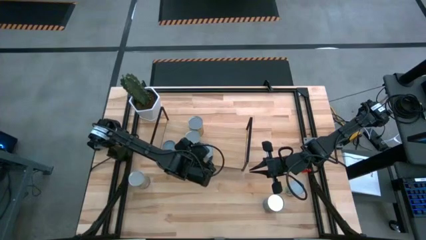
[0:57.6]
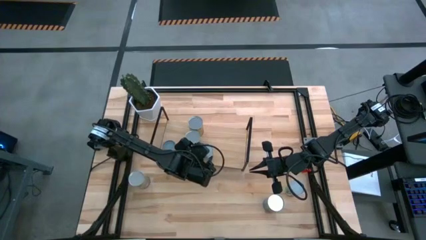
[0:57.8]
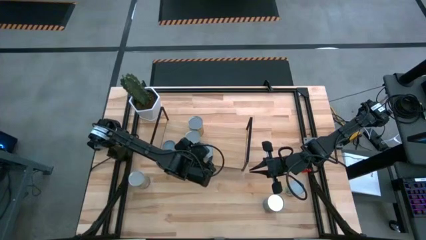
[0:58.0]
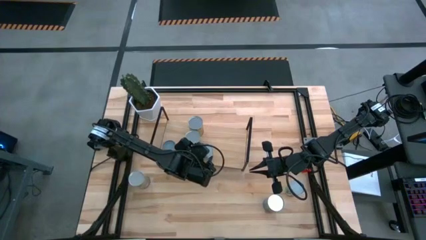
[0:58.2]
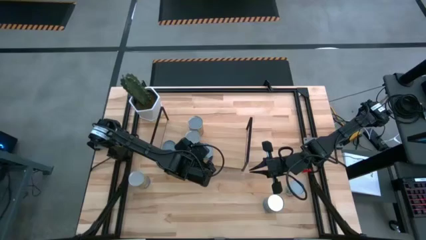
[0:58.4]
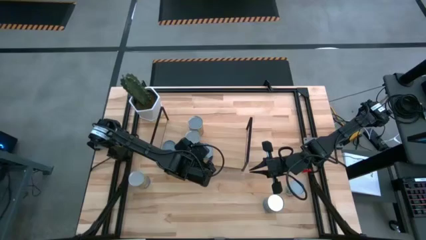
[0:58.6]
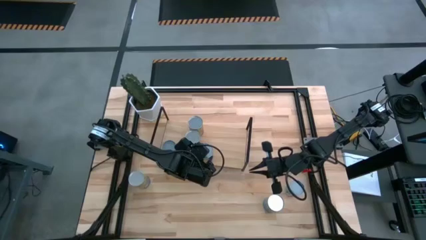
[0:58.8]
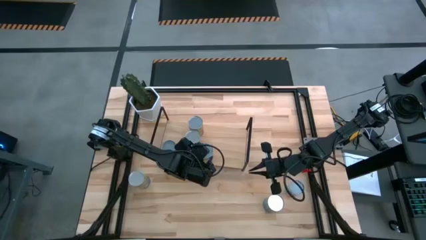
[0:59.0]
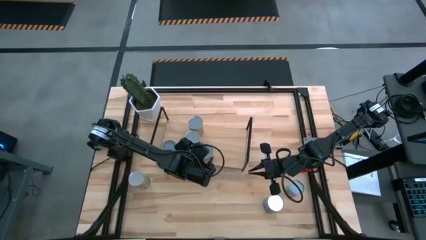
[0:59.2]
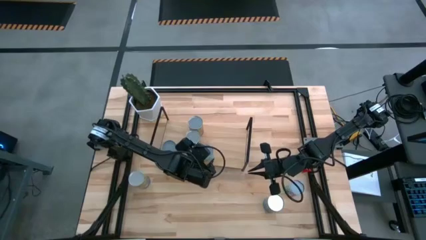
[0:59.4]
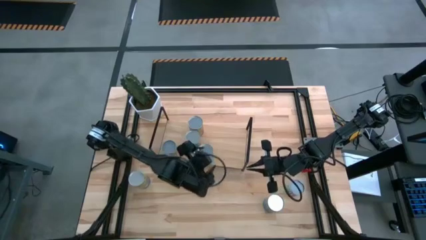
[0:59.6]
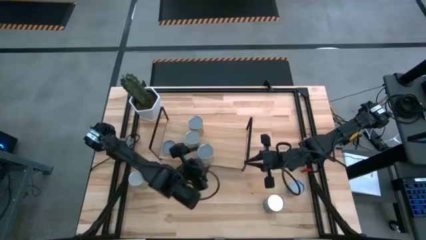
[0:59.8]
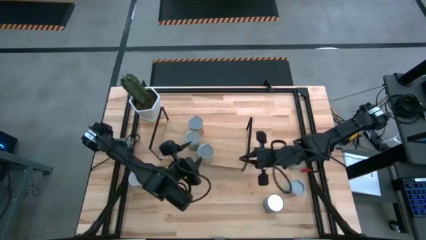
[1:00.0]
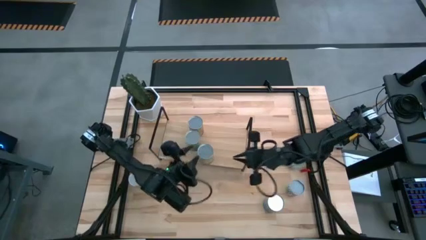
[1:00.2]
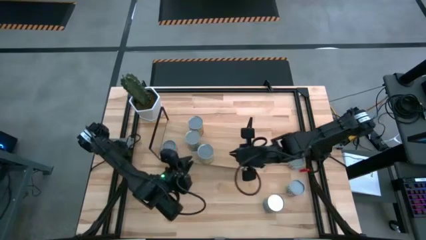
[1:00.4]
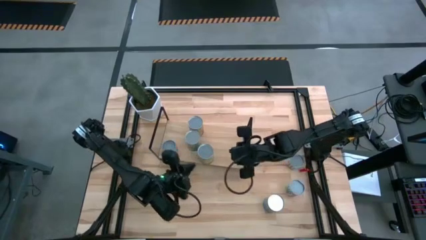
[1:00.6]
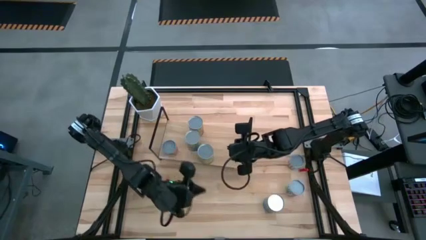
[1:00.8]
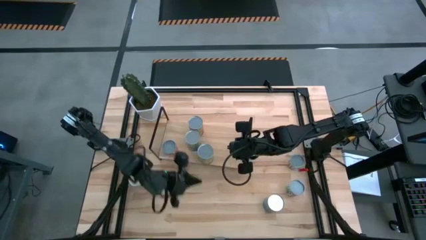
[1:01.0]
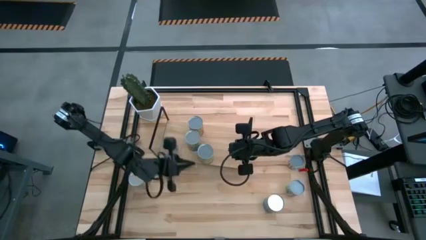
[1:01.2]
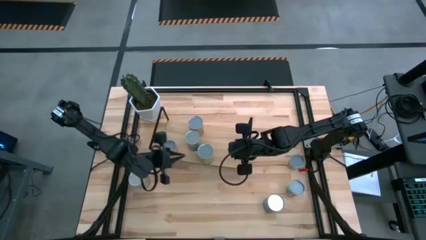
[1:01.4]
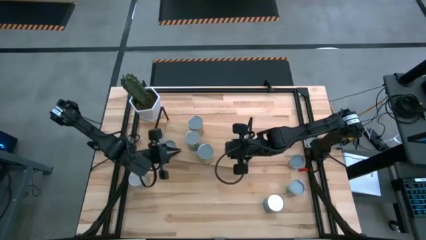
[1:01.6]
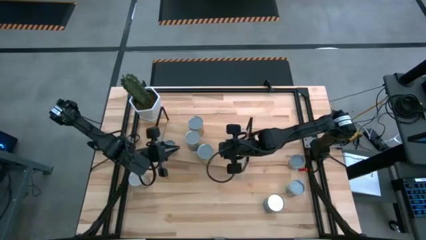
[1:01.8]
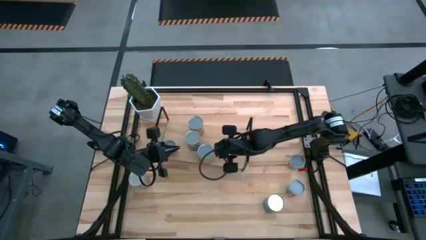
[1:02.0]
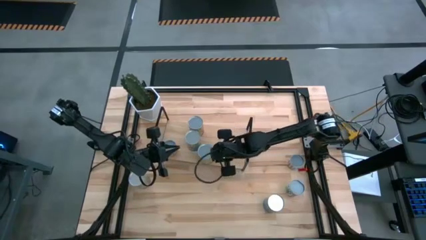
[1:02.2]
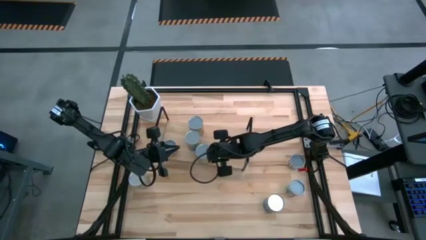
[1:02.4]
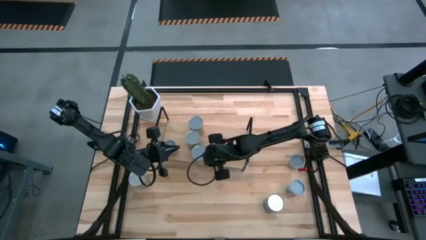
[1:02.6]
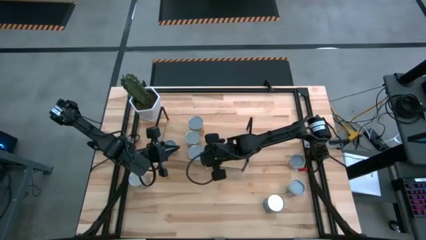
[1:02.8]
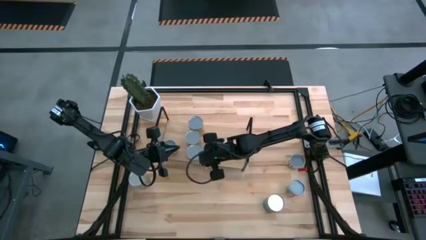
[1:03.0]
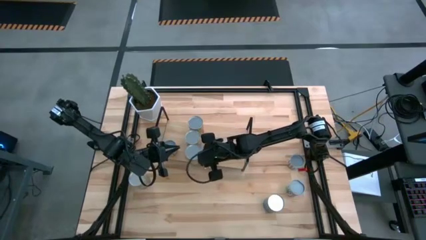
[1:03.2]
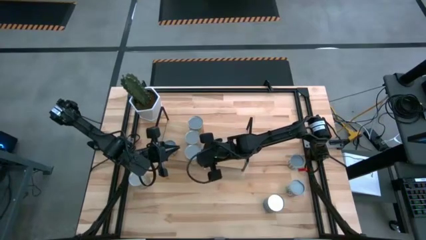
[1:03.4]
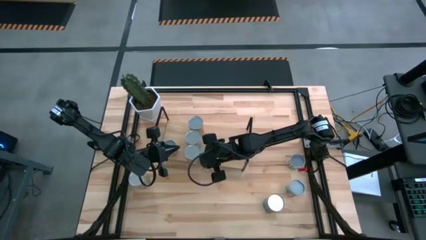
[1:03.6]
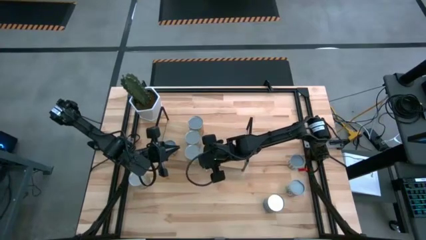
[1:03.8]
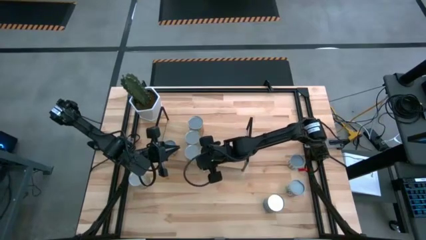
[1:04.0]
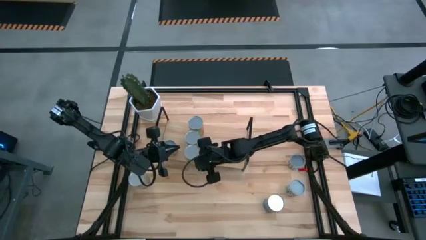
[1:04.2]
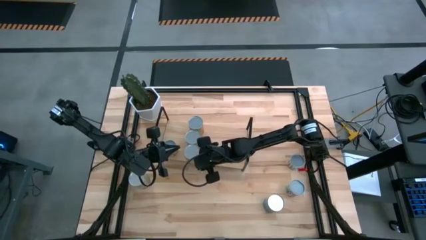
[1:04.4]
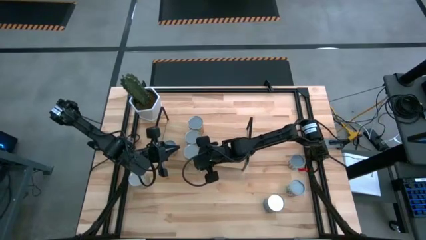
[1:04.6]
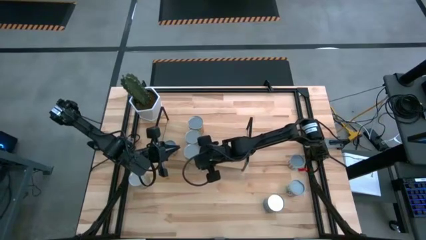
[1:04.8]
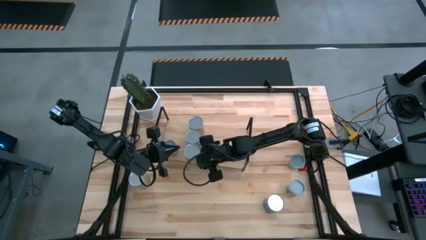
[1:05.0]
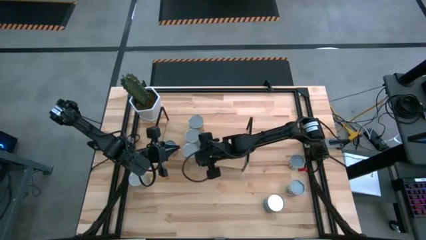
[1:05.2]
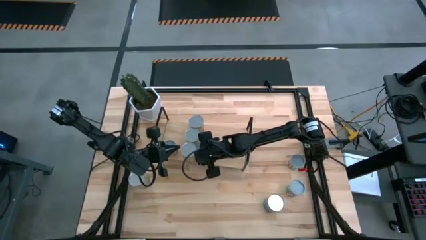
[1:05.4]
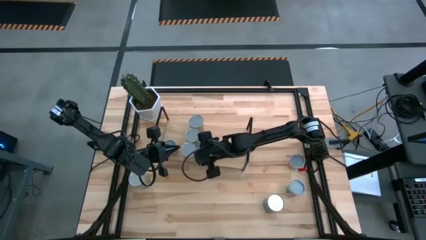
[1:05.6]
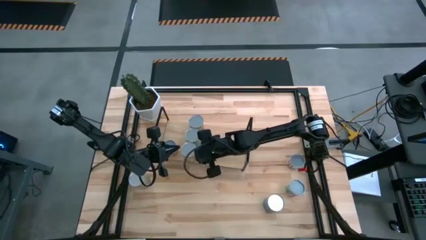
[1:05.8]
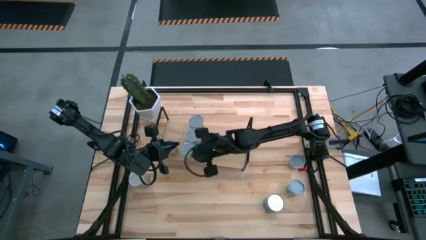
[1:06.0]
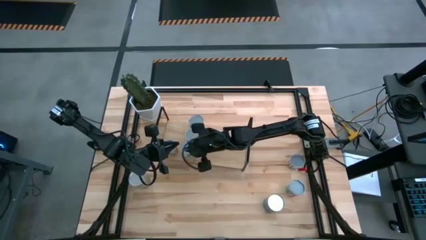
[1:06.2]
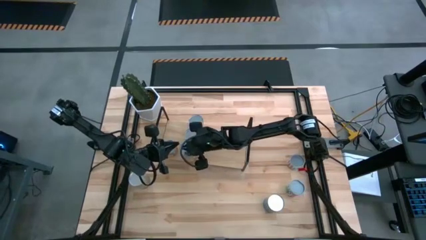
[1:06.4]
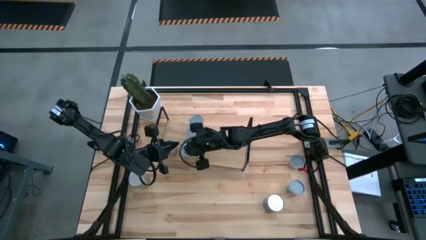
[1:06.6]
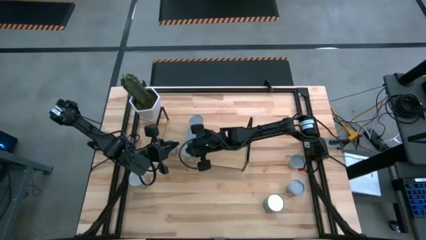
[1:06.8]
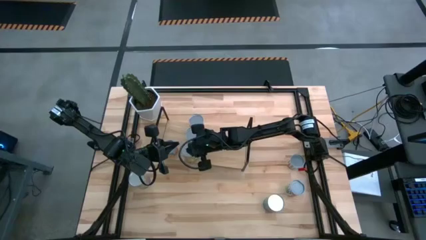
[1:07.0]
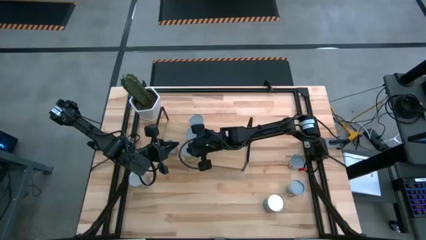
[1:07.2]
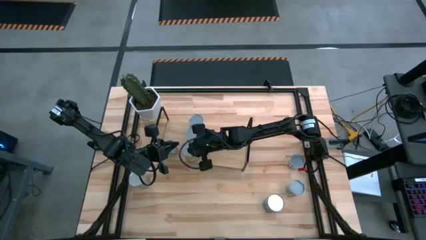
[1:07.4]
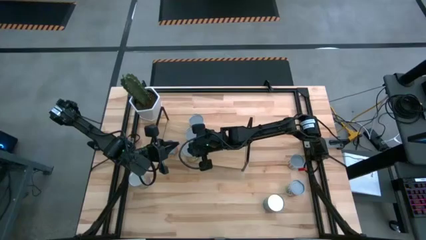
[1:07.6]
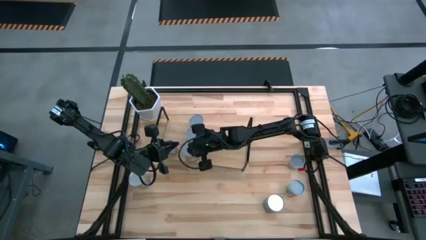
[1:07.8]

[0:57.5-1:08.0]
Task: Pick and place cans onto a shelf
Put the canned oranges on the shelf

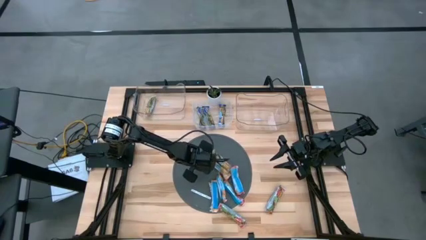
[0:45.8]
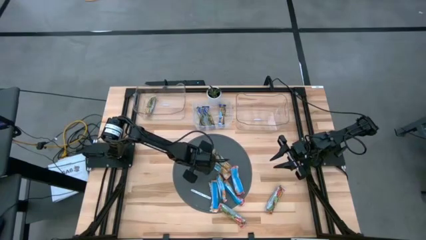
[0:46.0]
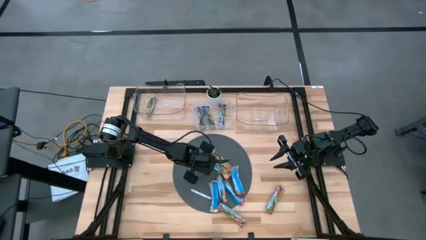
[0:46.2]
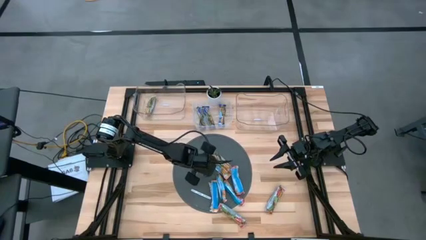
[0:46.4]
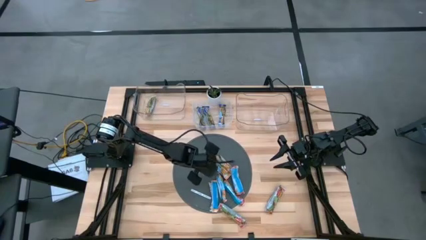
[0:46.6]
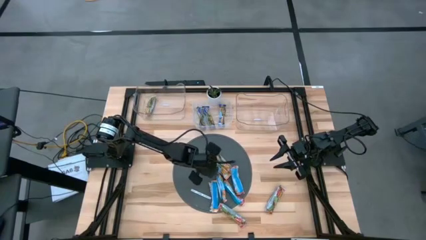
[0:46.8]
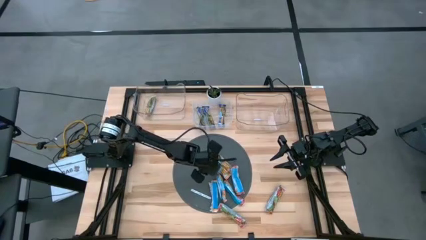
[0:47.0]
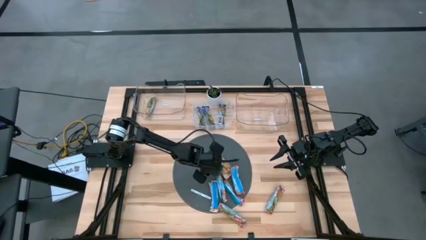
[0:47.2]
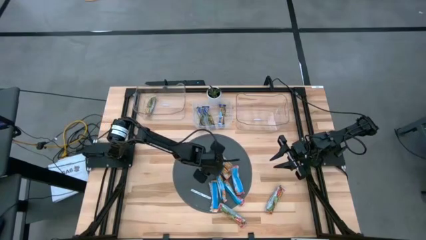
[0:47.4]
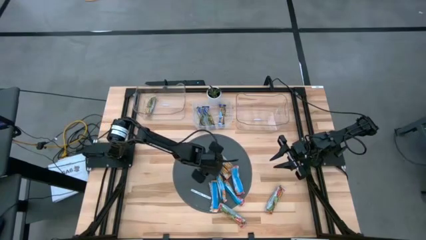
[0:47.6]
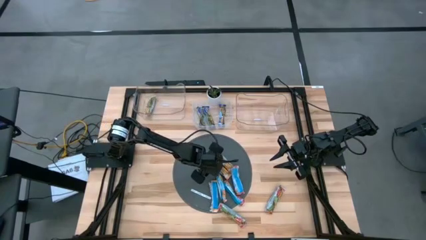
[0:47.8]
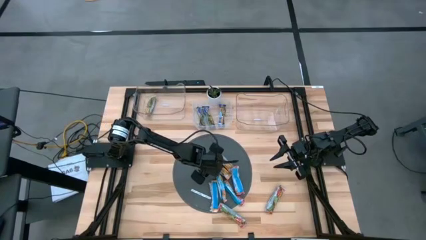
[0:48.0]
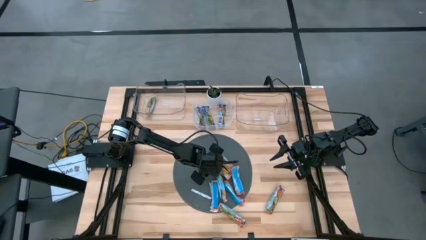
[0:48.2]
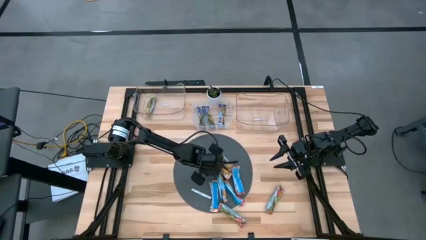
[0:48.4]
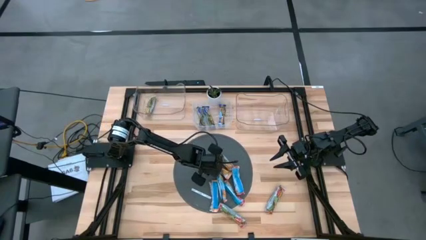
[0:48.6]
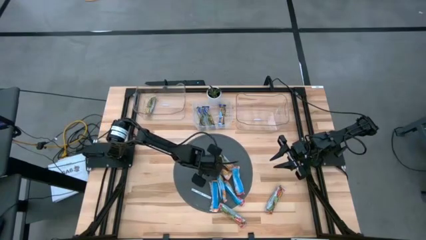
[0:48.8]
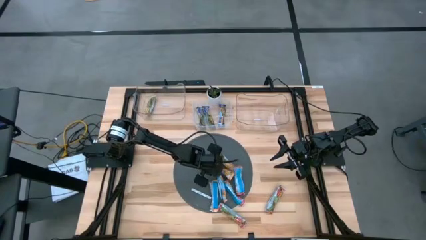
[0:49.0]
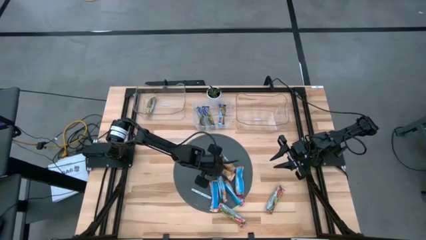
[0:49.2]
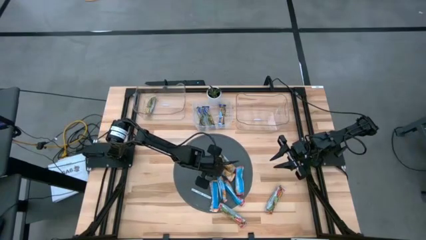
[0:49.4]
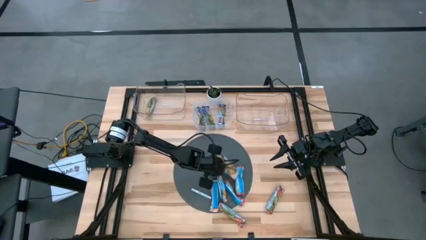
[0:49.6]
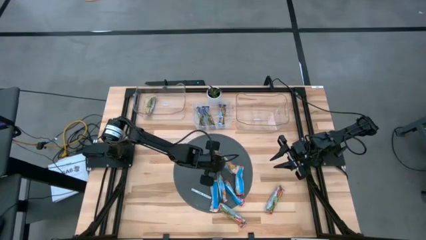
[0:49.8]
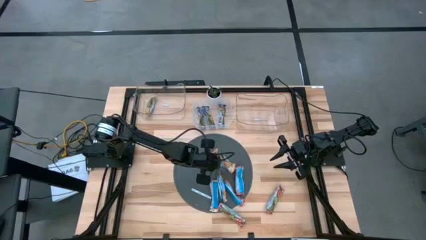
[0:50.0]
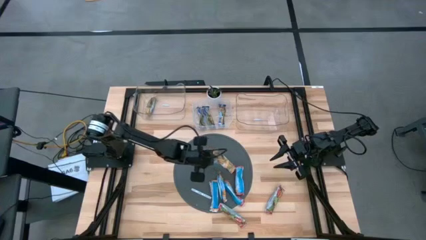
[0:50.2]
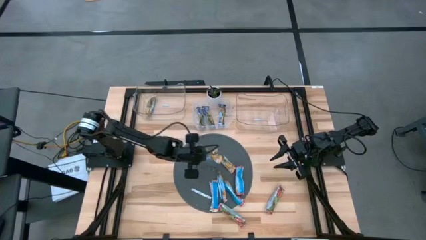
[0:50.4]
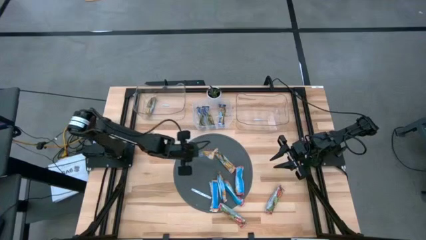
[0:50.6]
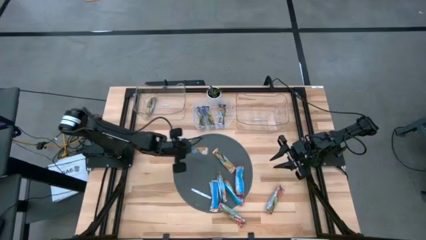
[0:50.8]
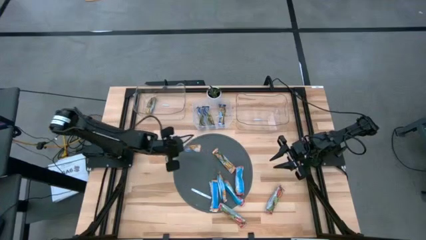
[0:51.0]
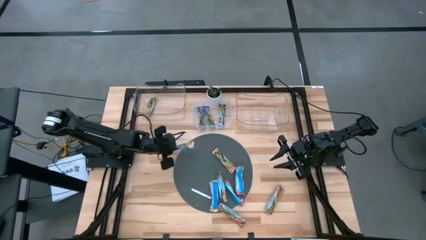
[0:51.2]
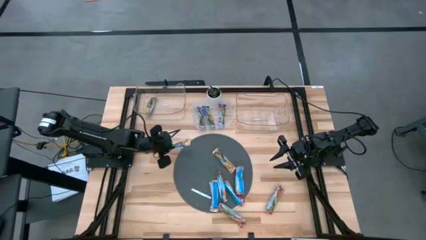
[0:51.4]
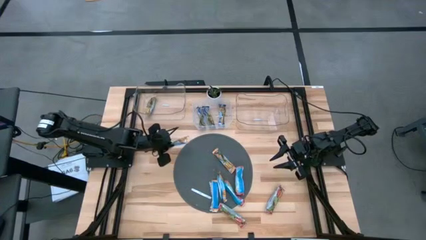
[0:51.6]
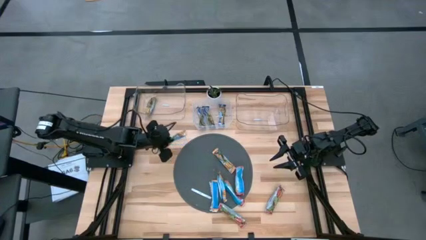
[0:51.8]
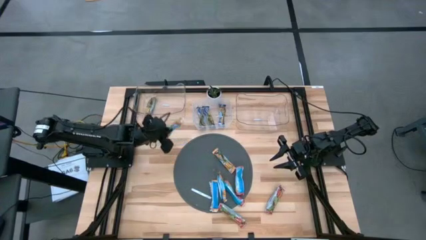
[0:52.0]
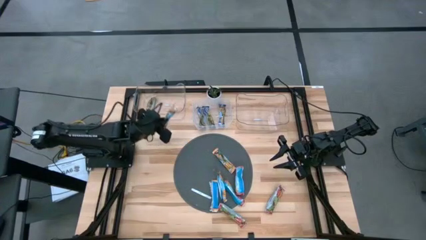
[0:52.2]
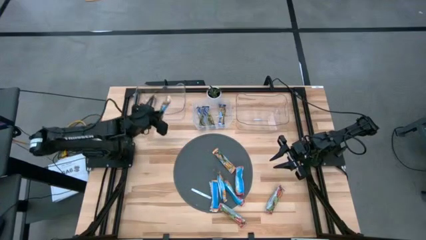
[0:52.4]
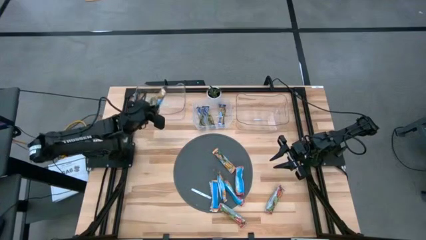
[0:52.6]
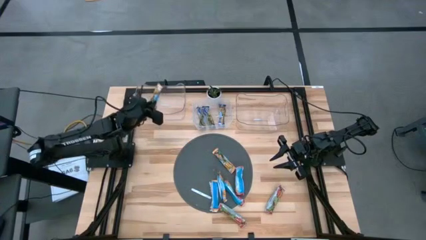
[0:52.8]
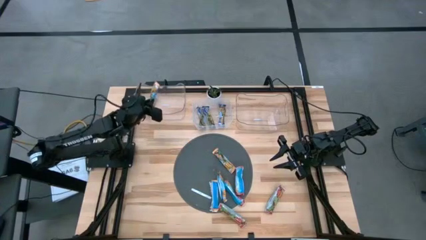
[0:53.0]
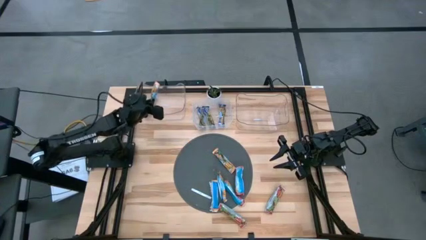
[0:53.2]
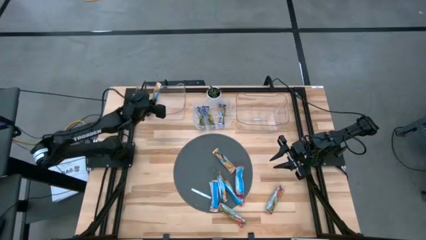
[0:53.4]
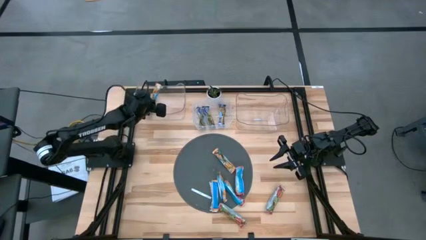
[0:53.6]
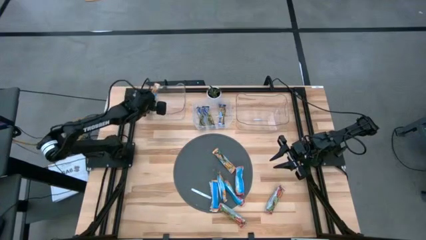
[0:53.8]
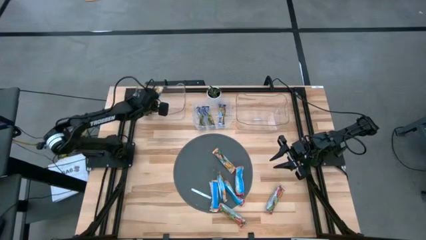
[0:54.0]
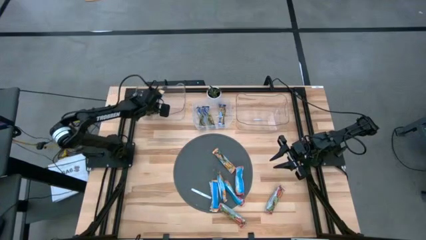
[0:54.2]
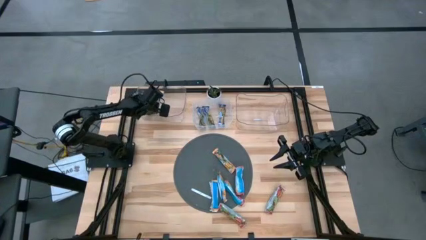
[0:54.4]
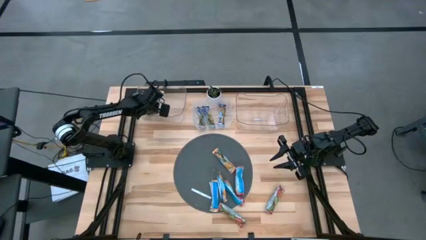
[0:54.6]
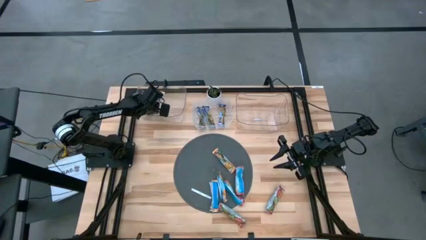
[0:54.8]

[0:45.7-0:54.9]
Task: Pick and place Granola Bars by type
Put the yellow granola bar into the left transparent bin
